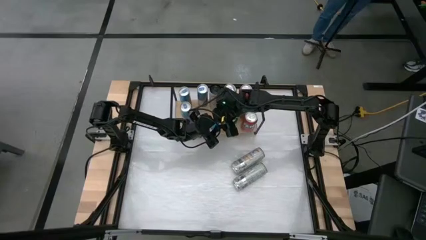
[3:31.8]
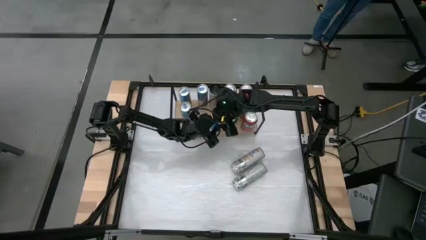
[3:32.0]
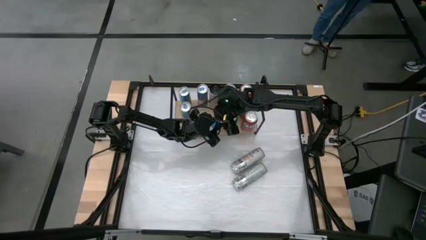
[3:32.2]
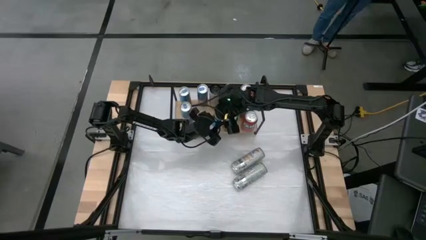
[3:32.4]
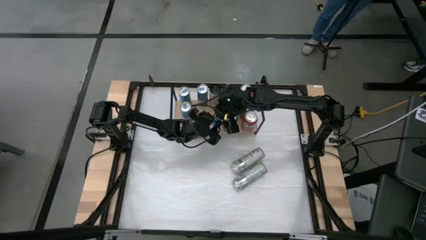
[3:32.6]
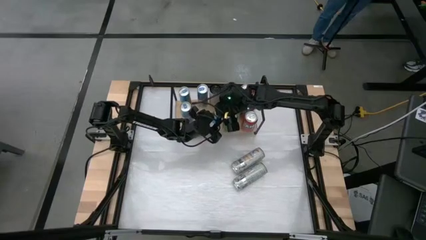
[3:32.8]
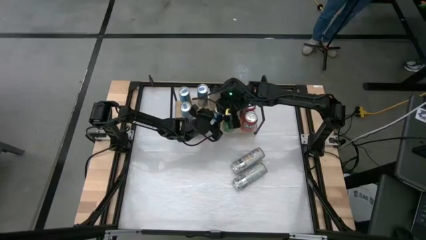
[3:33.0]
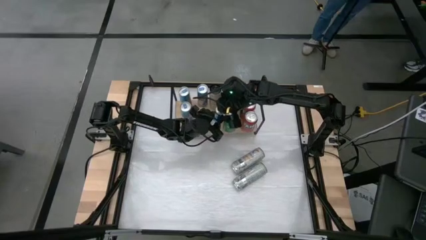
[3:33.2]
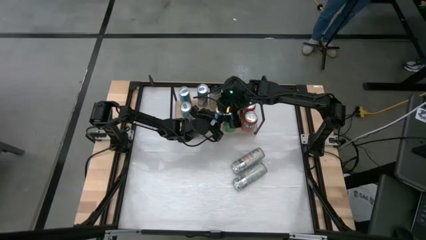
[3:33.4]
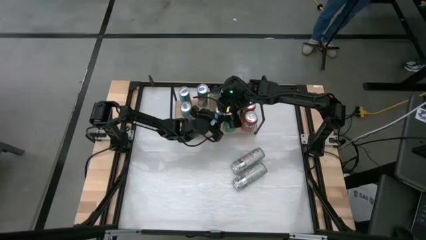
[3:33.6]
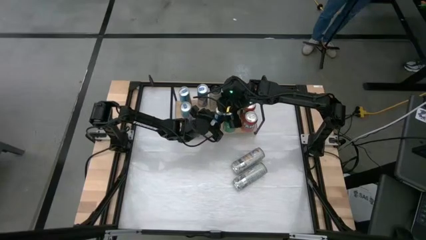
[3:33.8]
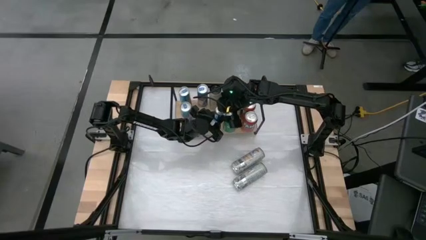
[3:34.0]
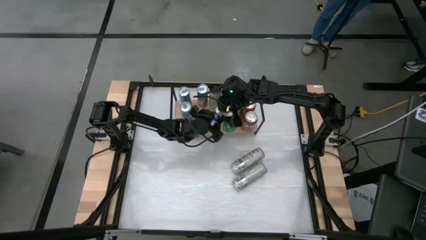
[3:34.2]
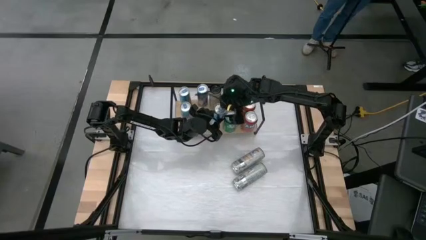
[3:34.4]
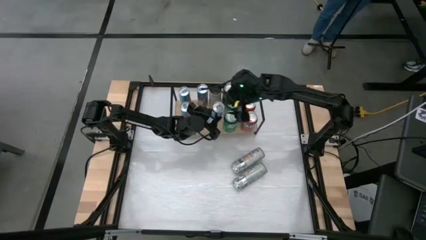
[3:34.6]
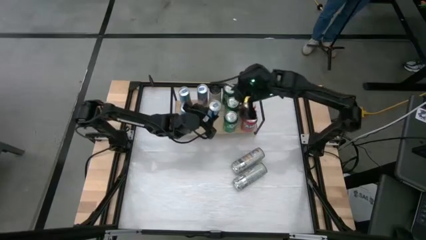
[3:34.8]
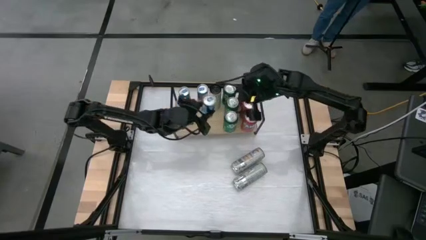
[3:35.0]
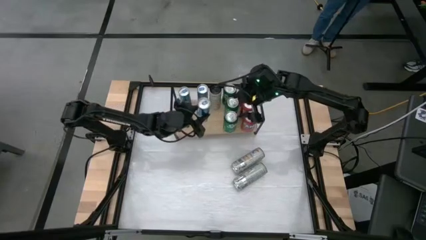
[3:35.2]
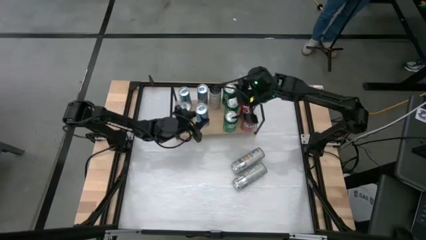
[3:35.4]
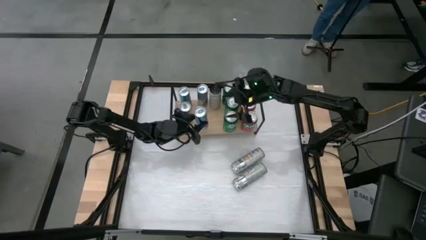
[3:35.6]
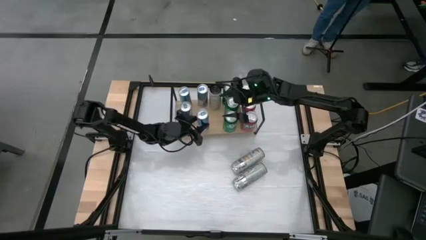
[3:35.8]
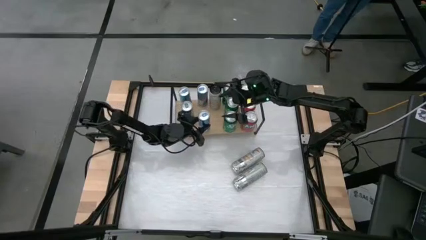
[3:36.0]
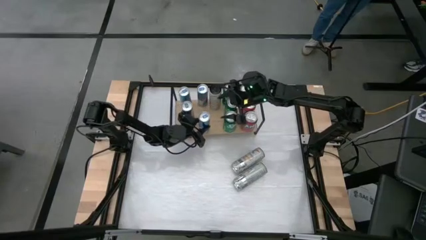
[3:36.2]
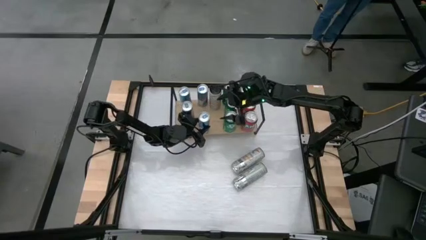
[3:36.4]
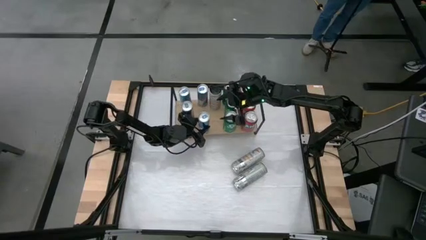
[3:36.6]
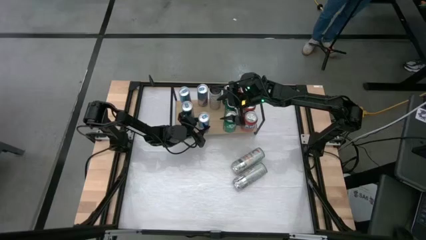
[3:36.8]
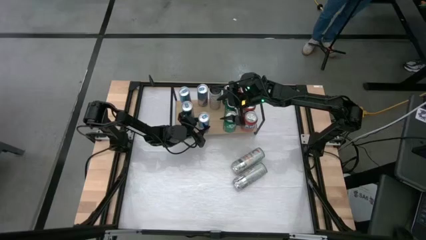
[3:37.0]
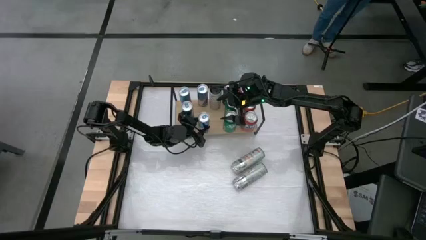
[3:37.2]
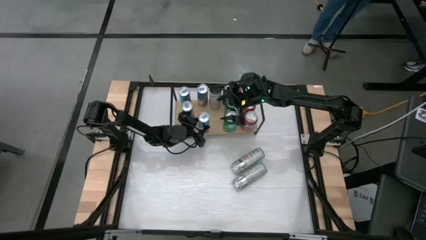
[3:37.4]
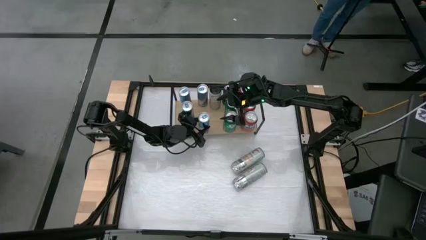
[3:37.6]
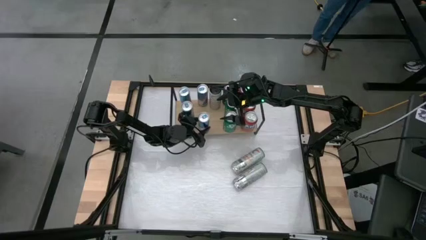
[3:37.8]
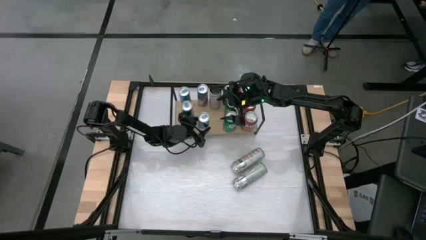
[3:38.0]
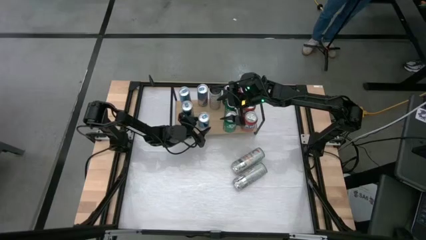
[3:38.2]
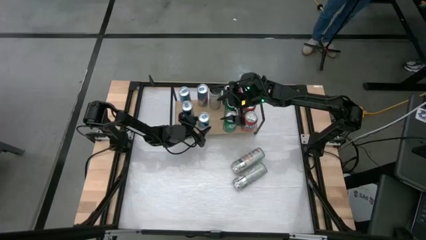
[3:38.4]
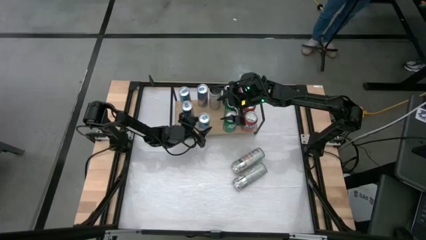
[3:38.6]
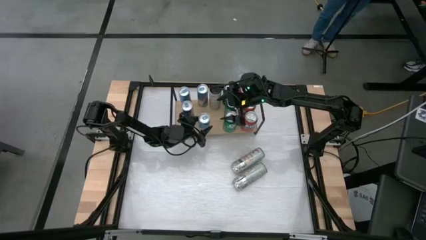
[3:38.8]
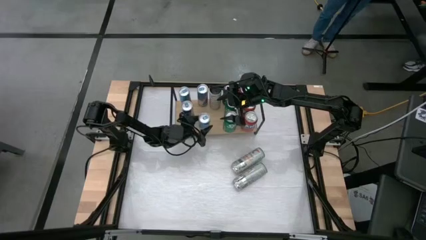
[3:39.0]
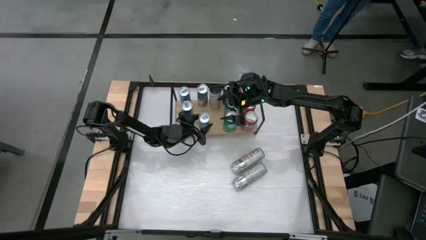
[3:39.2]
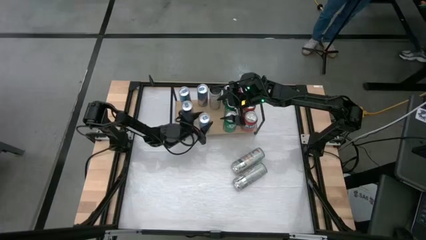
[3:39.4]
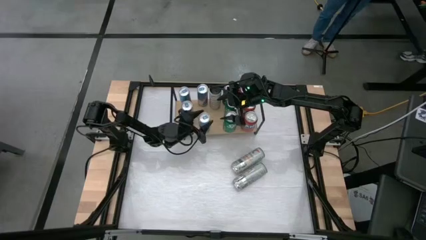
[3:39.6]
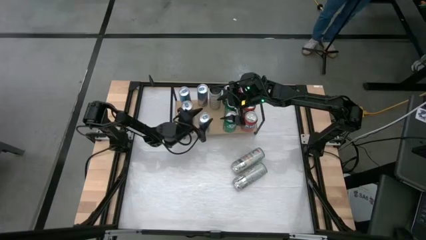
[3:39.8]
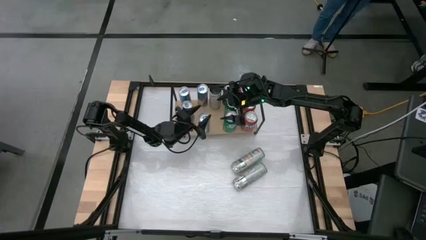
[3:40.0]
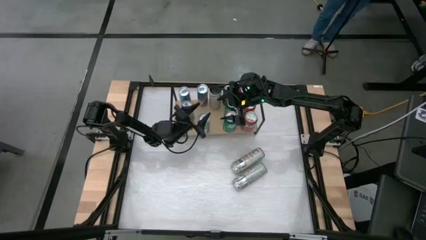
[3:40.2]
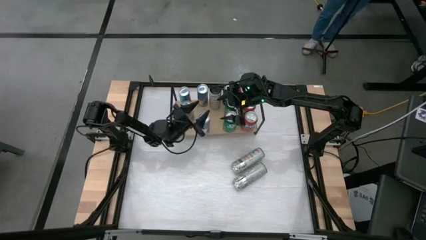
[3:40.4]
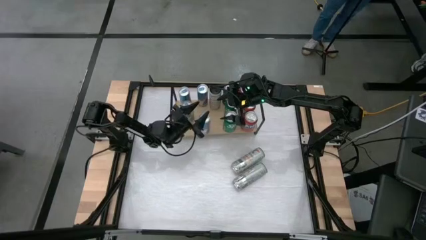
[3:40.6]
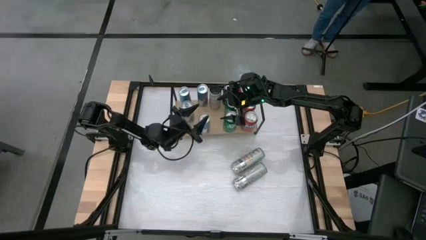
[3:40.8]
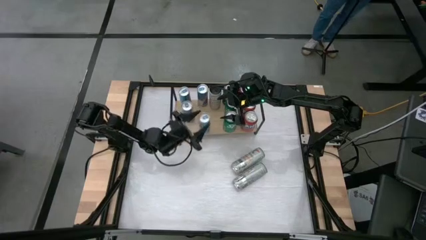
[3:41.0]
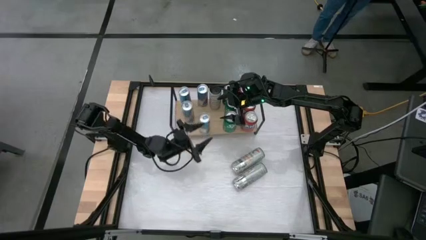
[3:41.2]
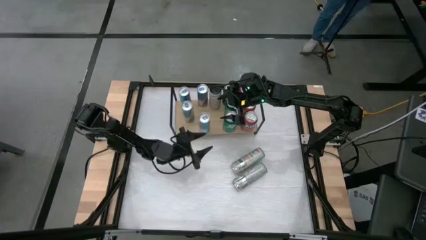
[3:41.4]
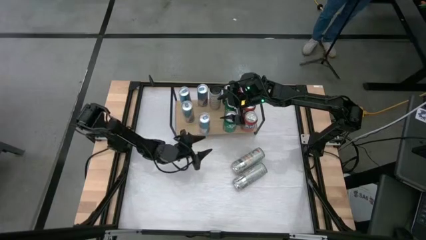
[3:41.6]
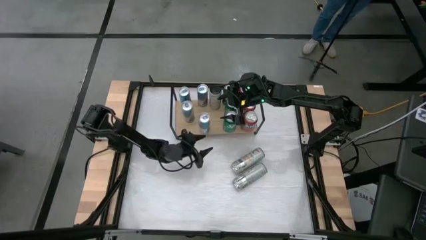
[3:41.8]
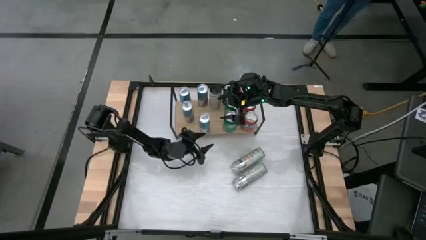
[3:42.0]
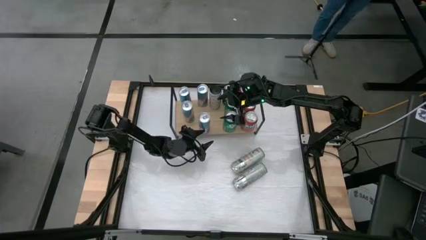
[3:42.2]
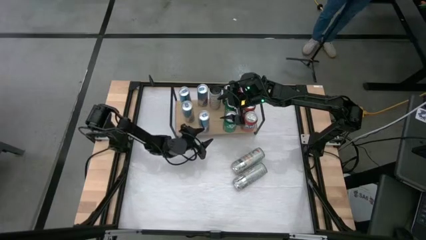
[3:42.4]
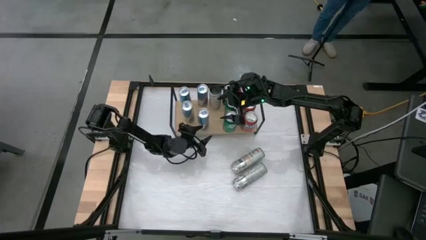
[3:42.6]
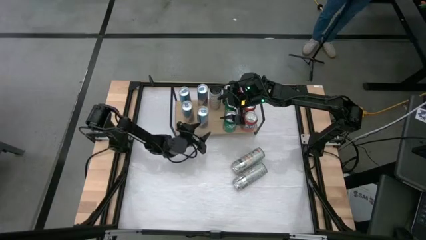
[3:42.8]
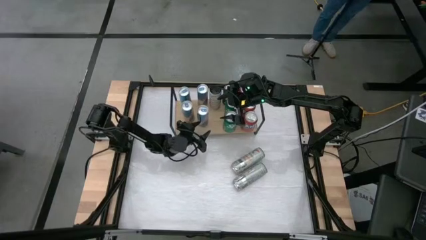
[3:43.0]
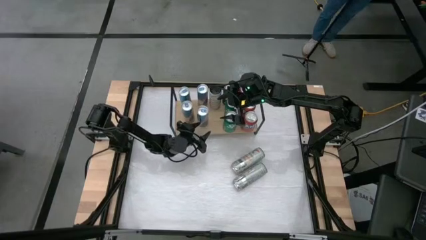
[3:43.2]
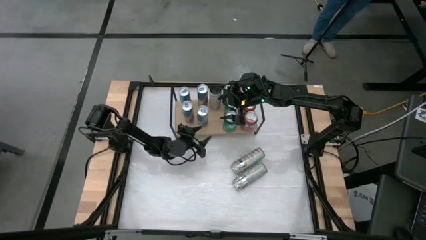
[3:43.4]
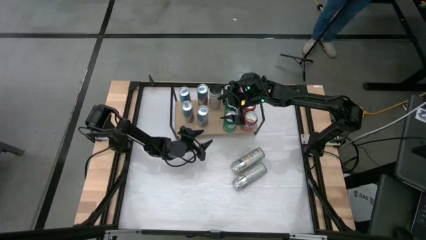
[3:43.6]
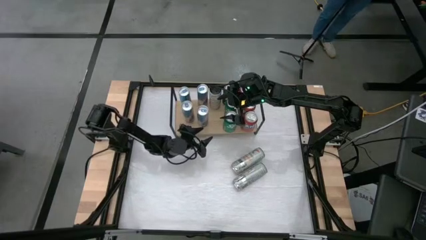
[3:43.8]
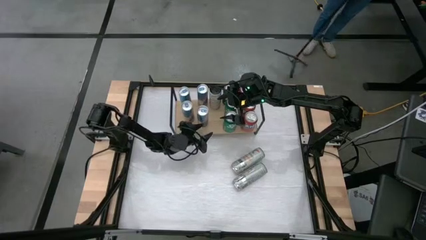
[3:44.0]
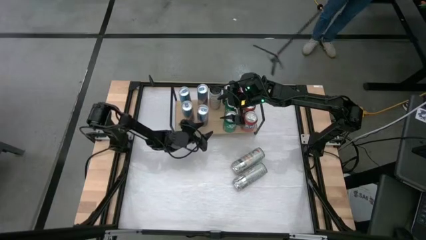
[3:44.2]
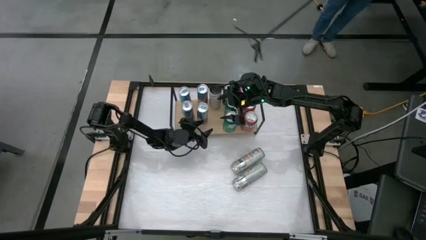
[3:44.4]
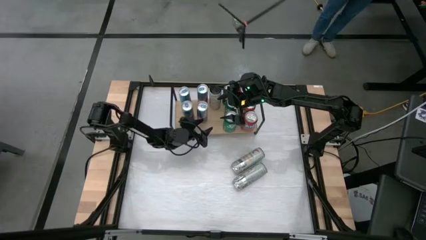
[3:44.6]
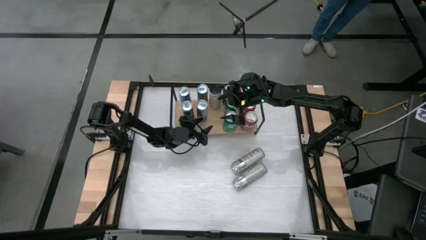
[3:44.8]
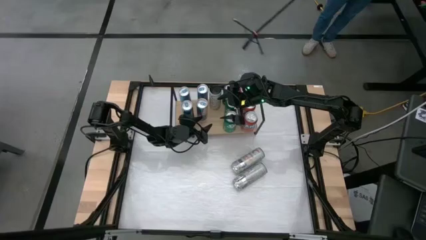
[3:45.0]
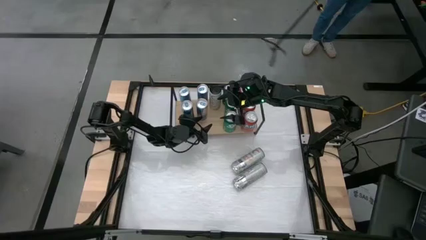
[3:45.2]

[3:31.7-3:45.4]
Task: Sort soda cans
Put the blue soda can on the shelf and align with the other blue soda can
